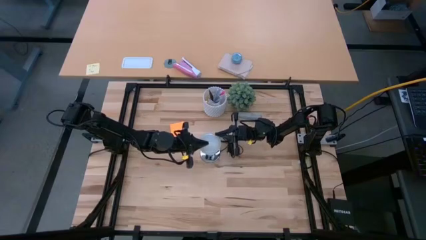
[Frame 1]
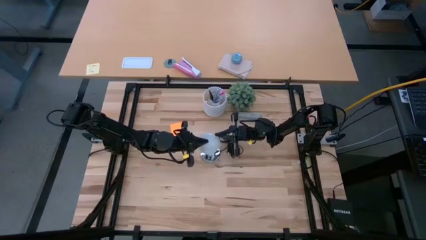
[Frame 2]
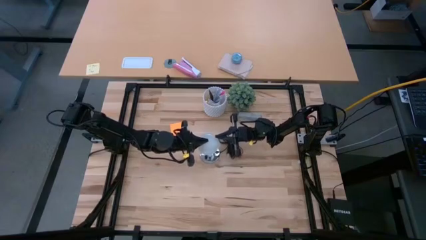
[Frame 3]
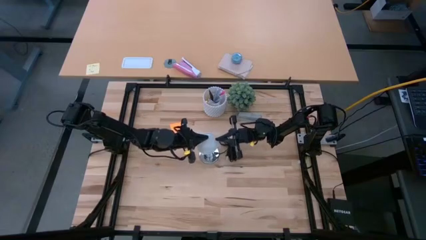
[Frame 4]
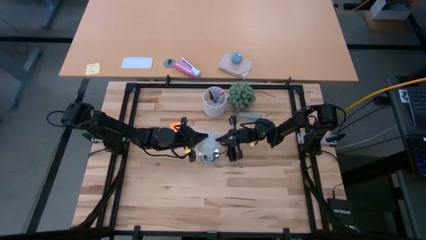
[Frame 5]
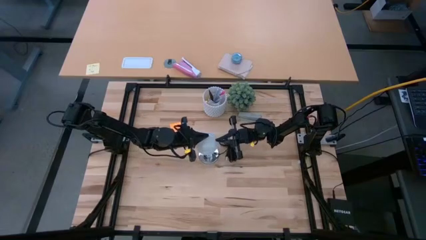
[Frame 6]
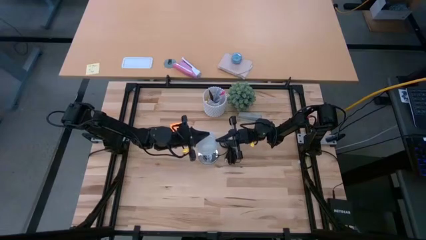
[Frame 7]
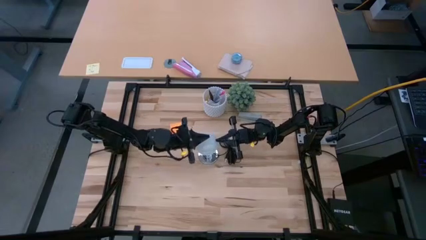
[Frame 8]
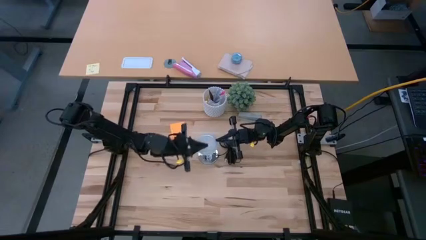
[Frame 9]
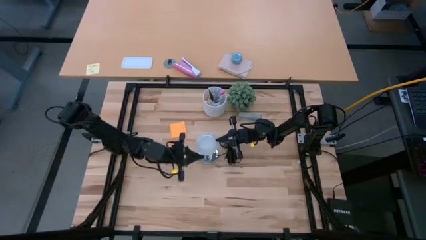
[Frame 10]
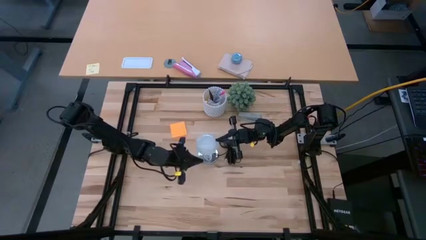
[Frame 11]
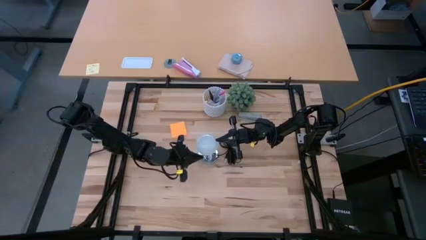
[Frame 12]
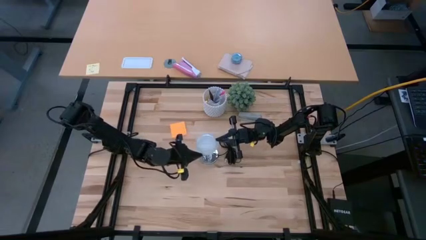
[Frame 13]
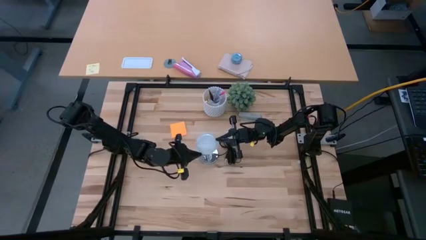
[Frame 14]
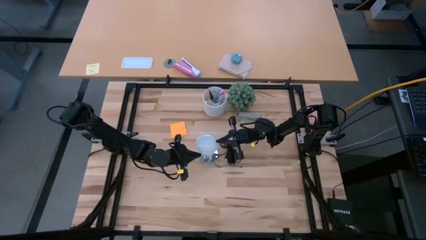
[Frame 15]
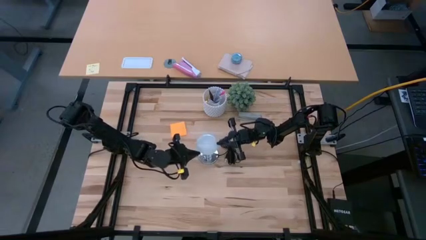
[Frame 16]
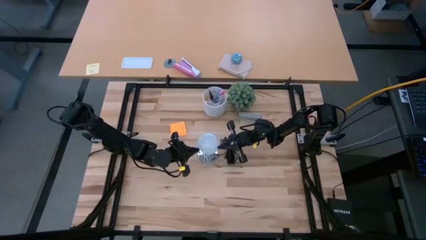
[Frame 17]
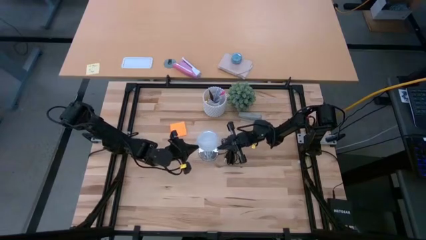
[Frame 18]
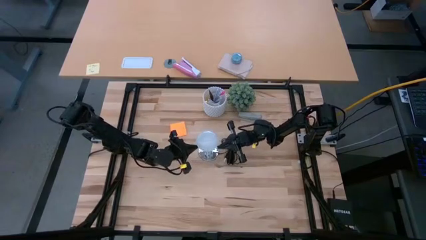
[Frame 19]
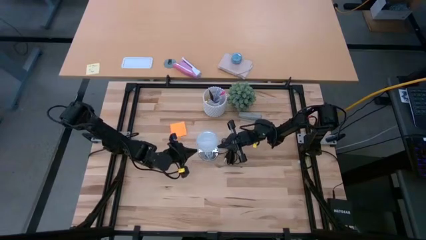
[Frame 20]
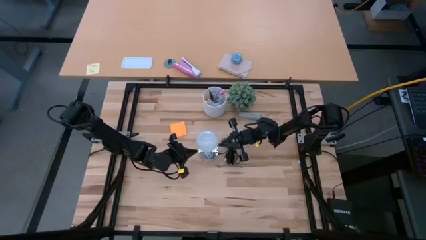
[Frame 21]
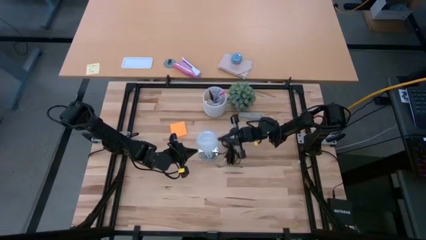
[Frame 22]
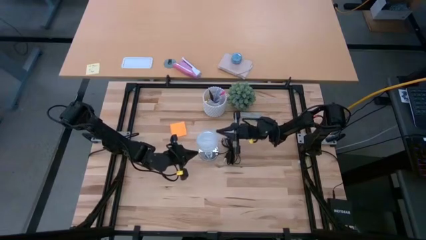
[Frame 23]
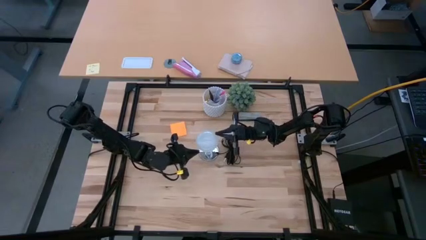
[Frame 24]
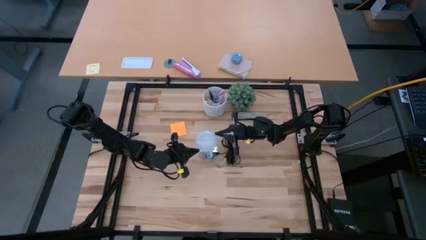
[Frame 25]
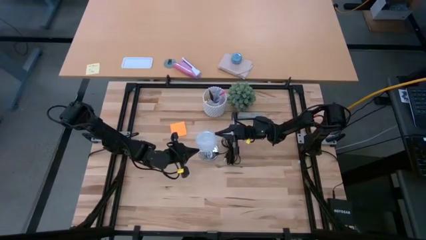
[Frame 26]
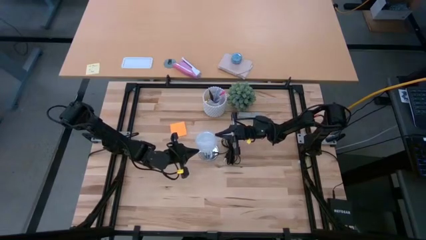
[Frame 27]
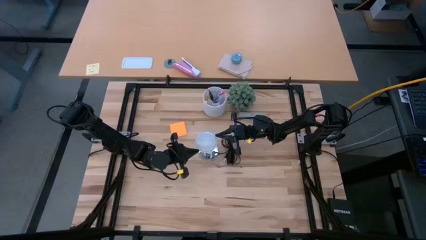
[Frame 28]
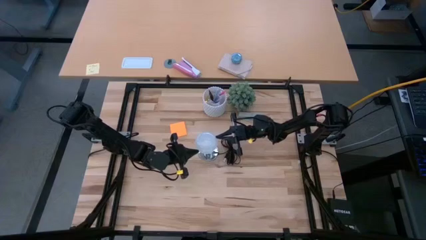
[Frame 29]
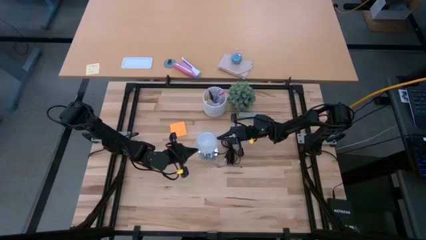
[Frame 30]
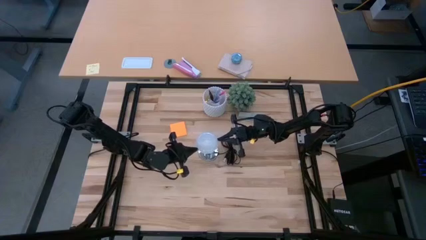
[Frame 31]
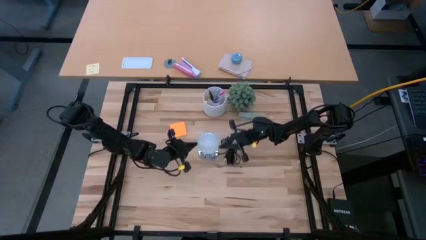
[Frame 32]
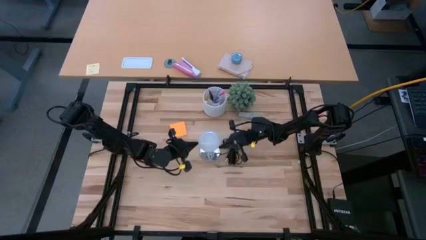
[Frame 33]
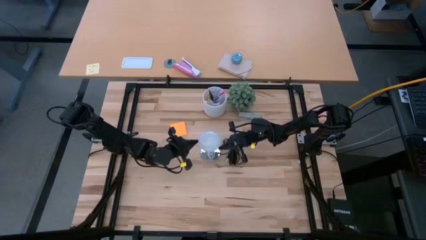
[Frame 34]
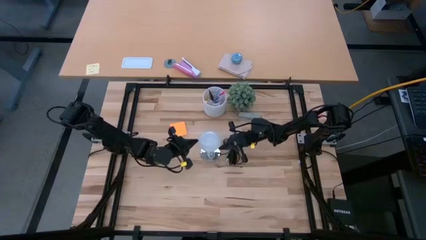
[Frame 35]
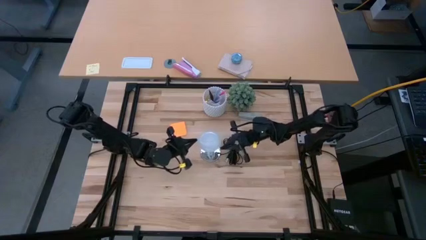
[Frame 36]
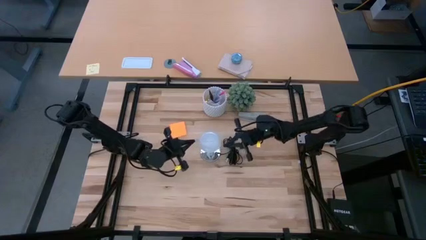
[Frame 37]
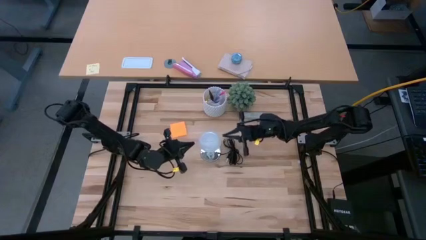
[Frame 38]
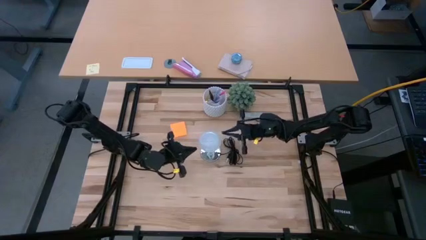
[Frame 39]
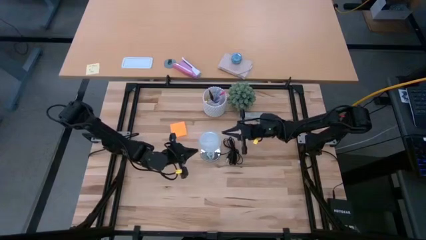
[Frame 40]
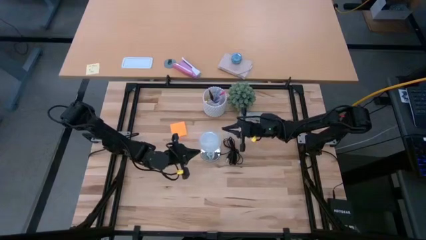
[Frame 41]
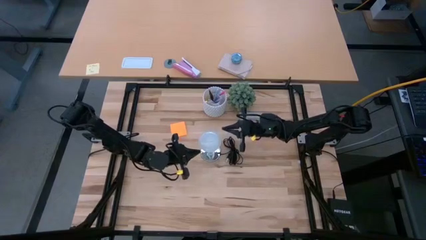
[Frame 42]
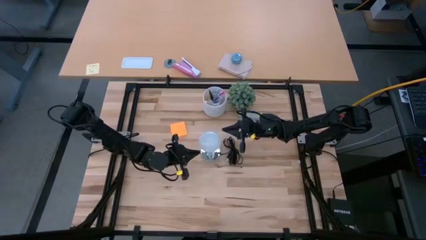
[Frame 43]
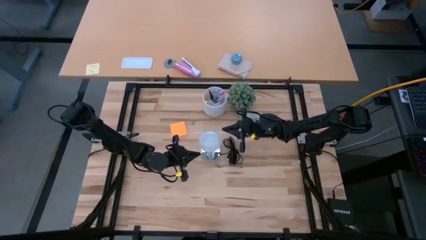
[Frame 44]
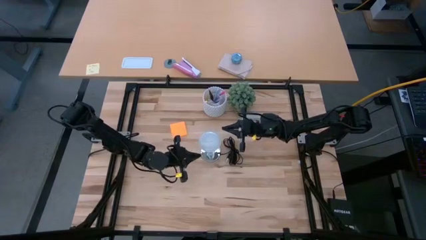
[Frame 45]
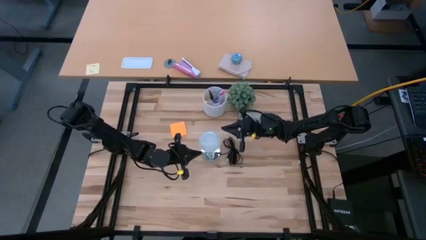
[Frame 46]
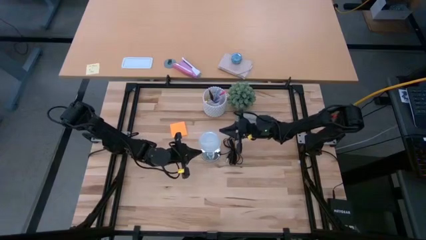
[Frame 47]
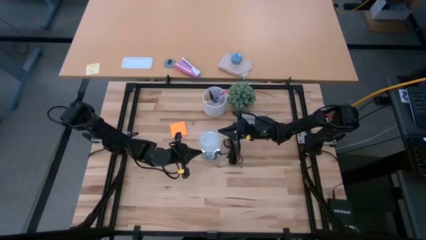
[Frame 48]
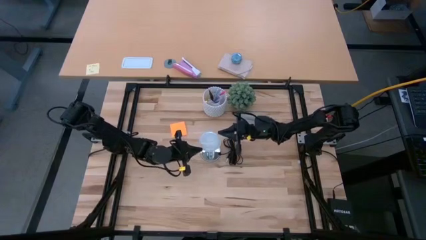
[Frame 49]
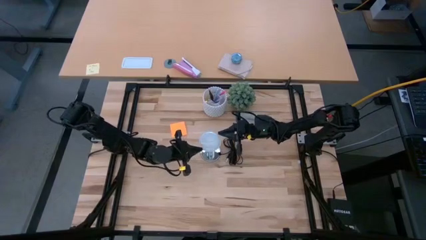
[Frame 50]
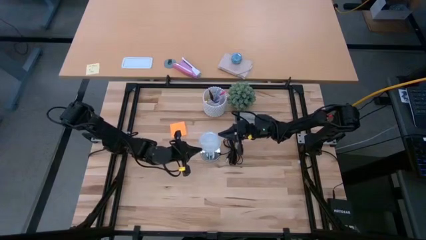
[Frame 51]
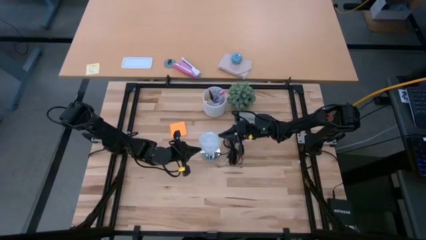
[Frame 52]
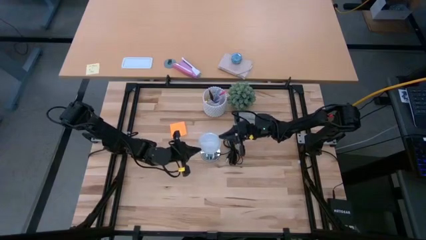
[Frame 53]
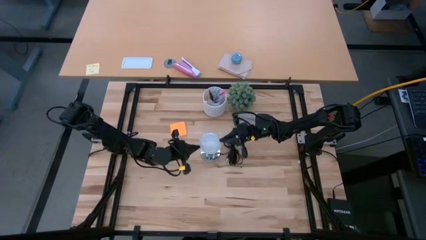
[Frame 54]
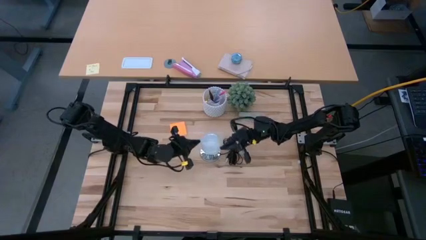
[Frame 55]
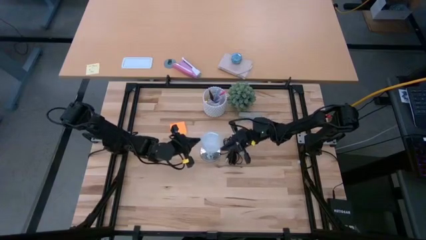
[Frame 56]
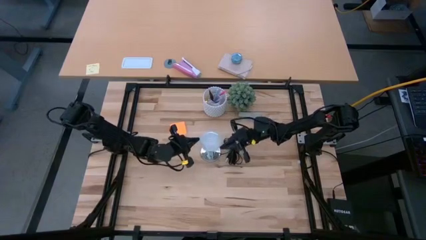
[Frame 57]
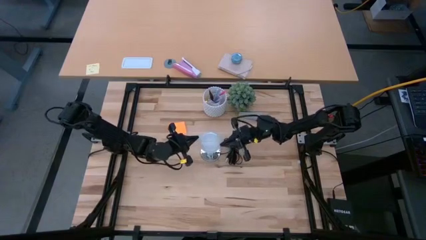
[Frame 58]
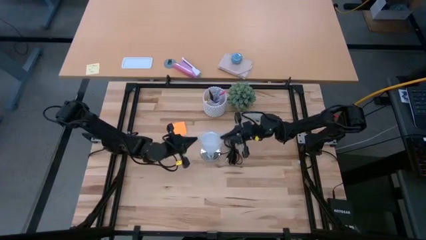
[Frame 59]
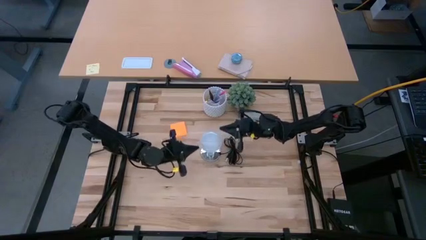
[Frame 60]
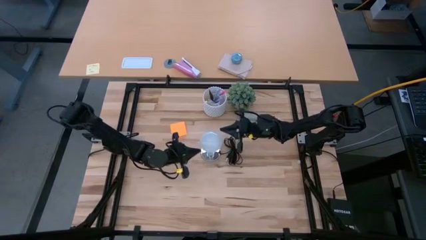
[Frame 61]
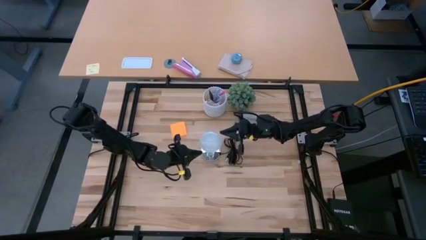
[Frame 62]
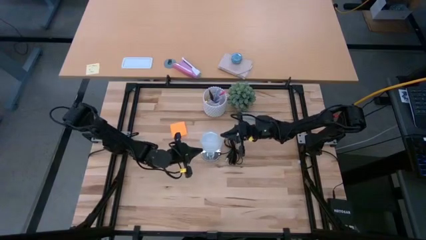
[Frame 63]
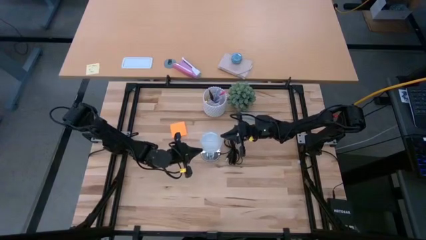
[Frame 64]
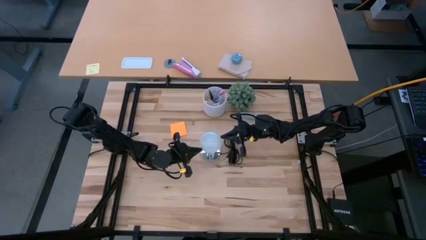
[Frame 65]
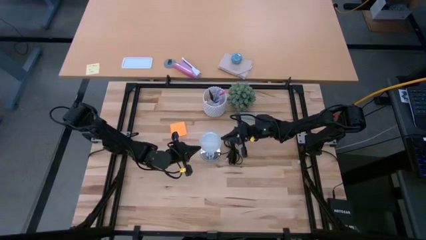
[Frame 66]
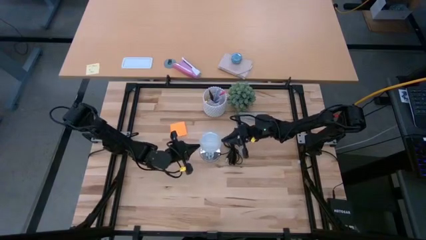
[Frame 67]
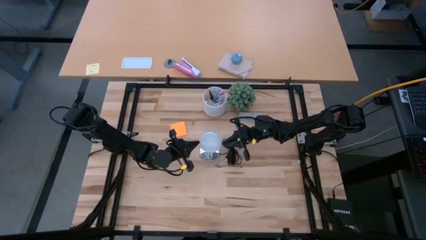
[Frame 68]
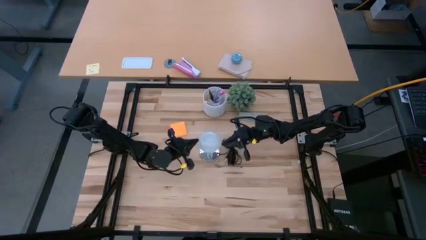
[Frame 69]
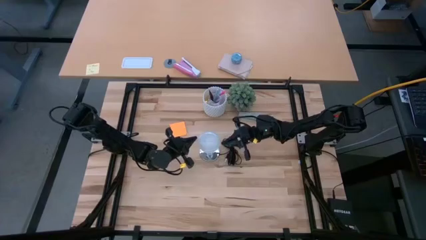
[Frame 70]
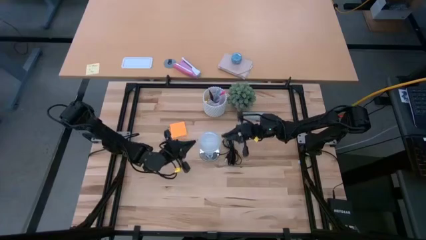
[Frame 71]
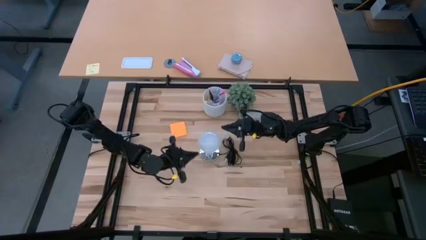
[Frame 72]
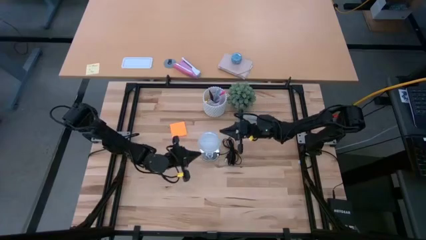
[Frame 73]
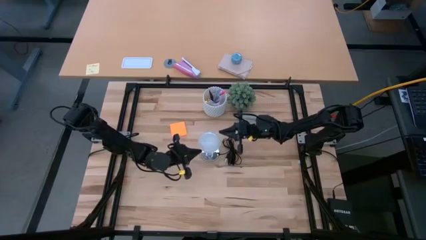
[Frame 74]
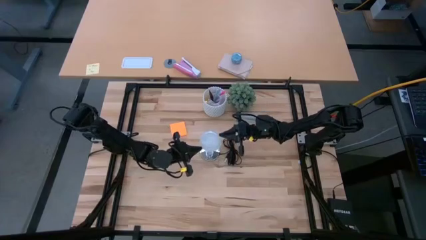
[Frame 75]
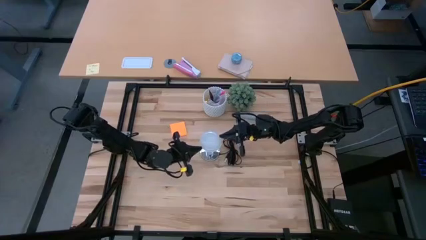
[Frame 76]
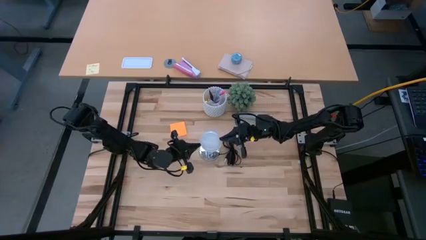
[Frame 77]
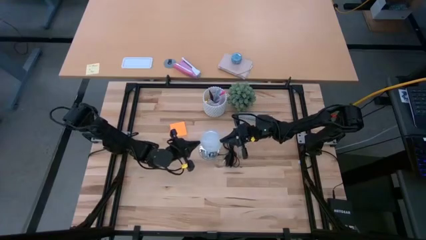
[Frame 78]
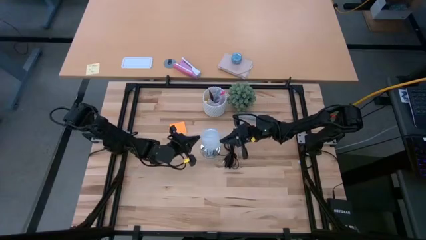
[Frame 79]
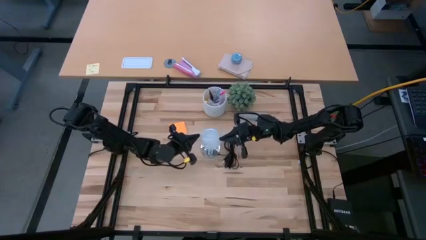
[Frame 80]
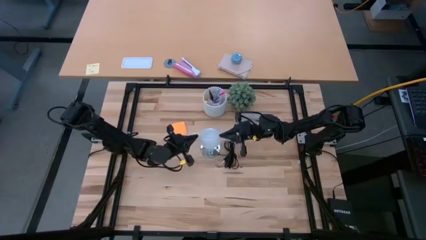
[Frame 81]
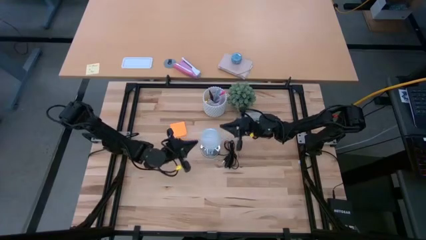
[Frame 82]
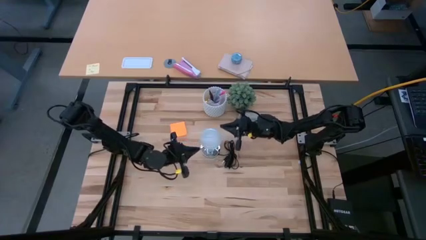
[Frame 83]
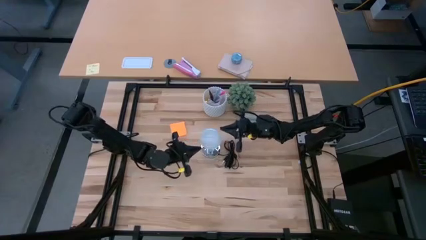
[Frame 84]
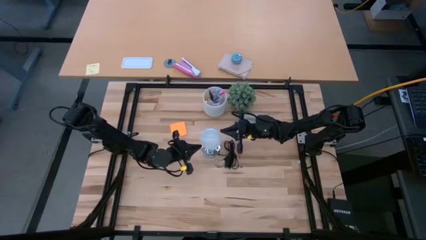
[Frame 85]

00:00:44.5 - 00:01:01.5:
Task: Screw lightbulb
Insert the light bulb into the lamp socket
